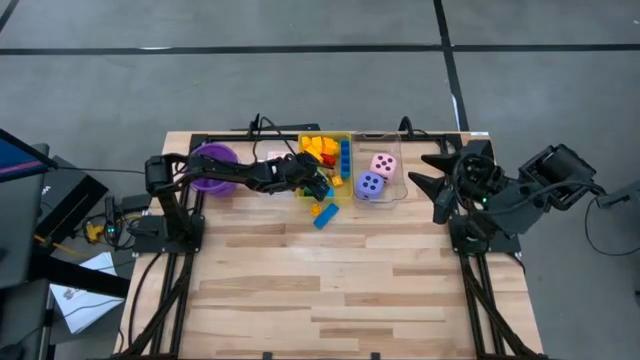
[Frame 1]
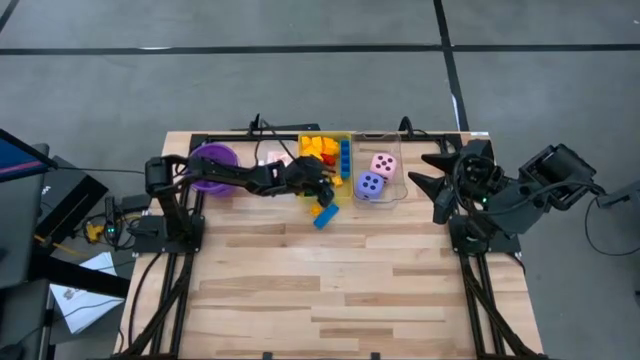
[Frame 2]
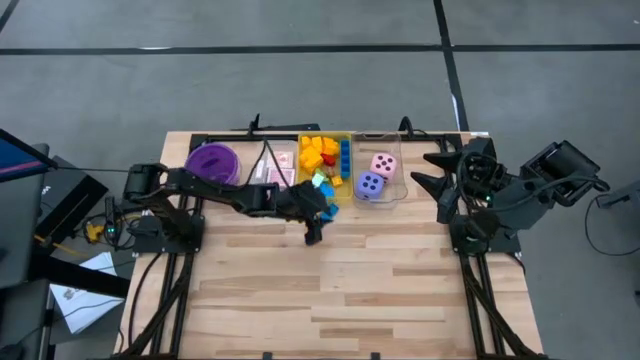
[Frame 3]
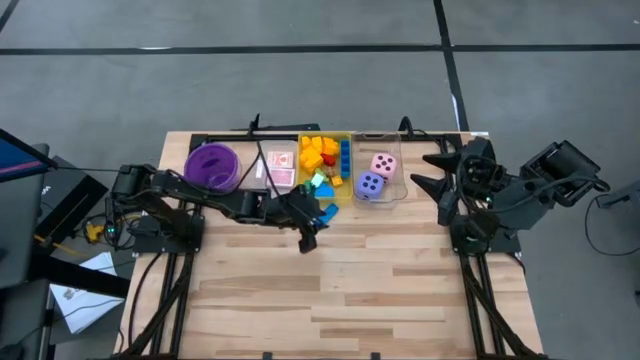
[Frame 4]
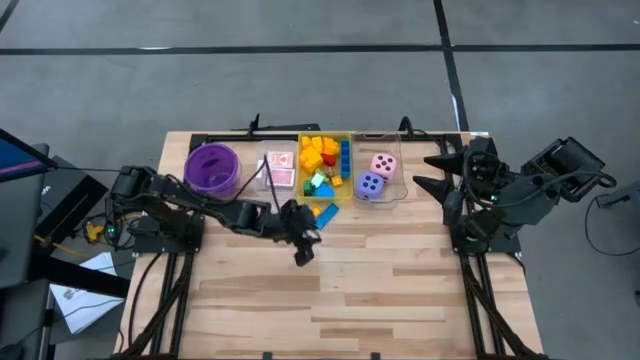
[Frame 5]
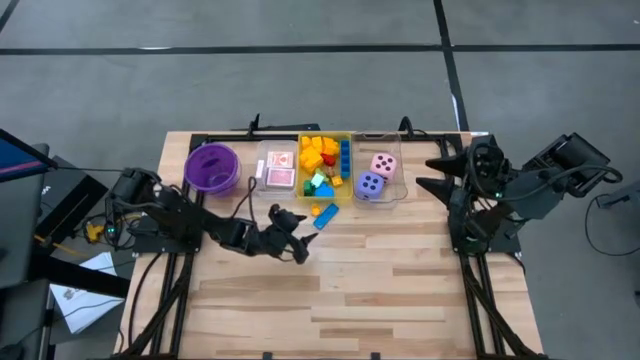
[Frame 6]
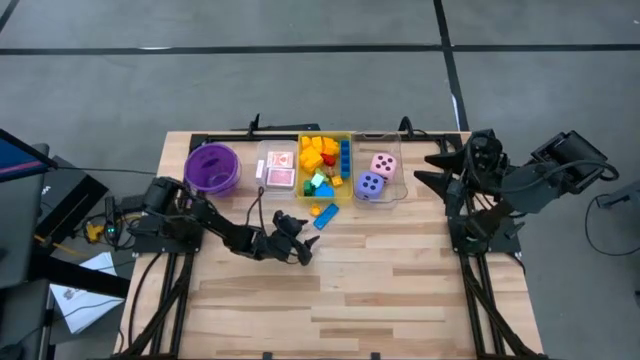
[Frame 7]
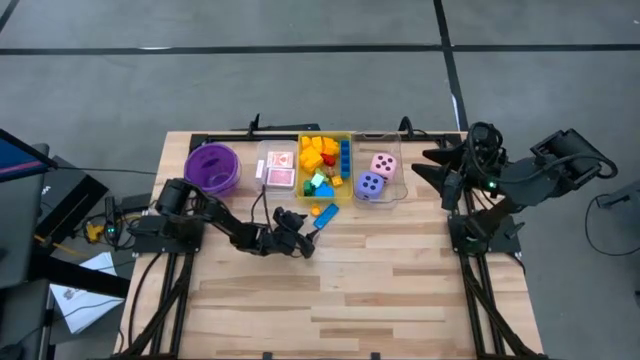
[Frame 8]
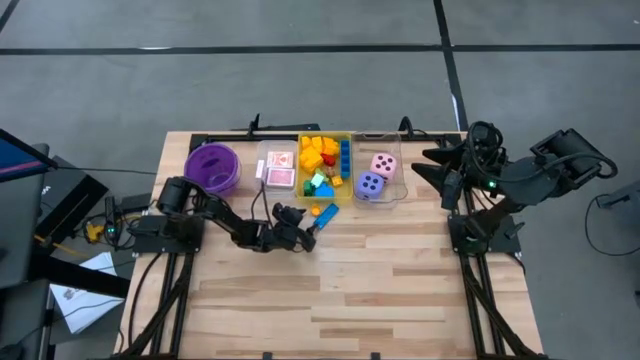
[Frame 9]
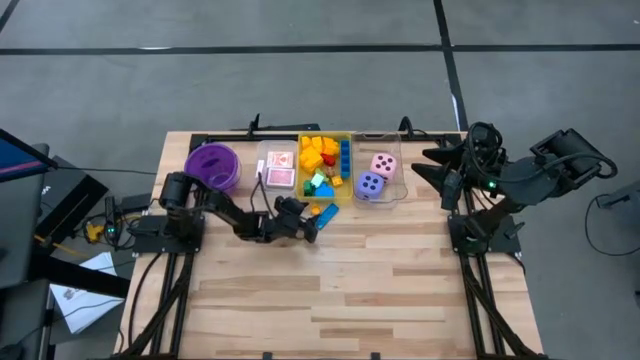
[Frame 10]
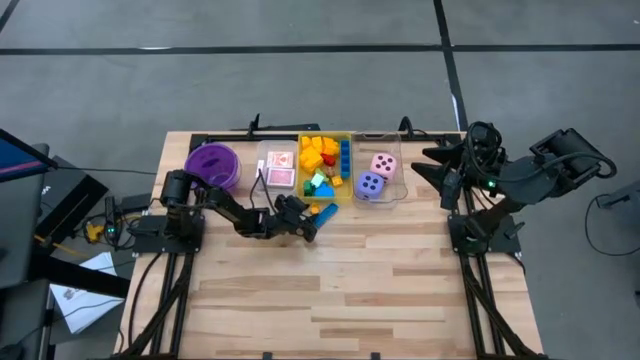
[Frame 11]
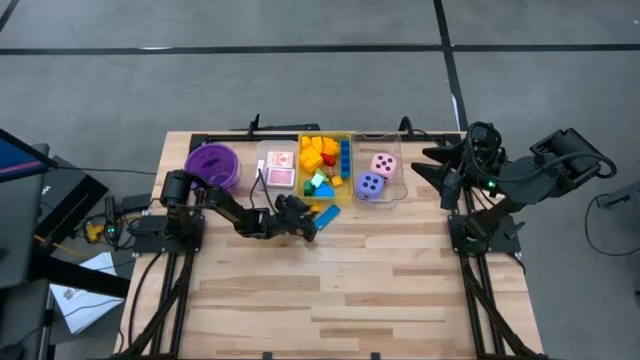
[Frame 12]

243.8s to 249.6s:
Task: Pick & Place Toys
Put the yellow gamepiece into the yellow bin

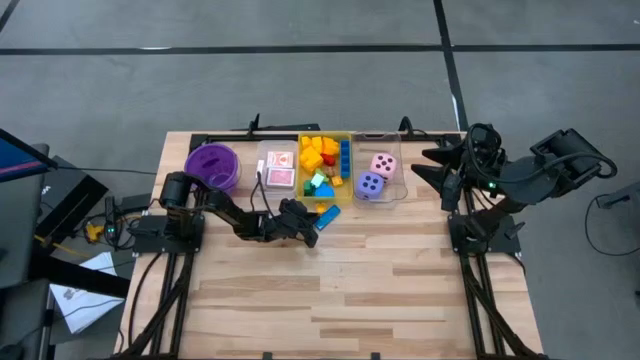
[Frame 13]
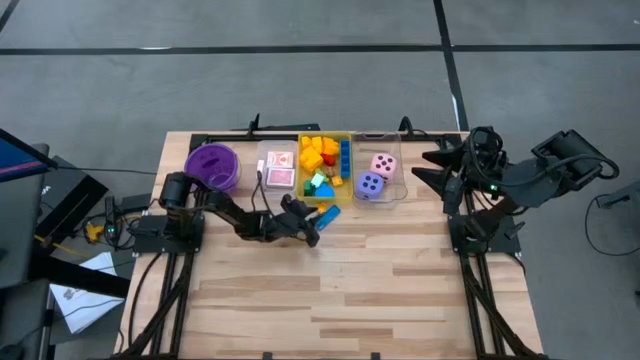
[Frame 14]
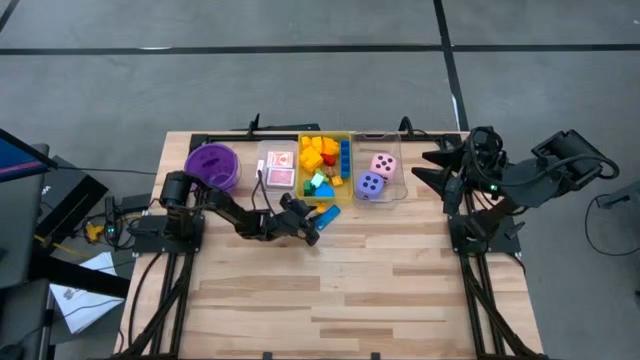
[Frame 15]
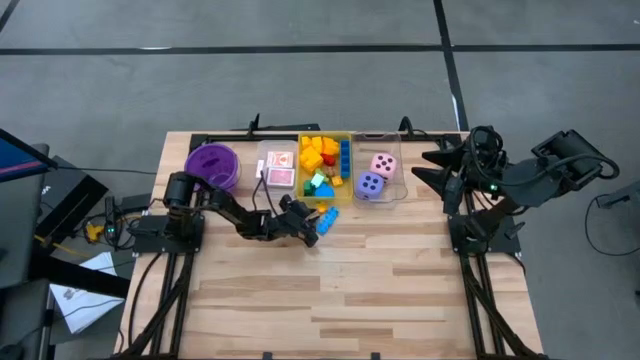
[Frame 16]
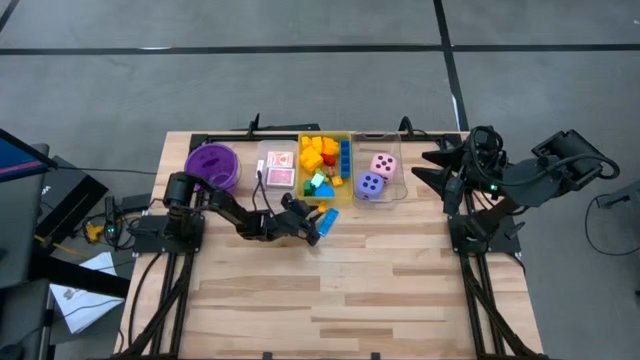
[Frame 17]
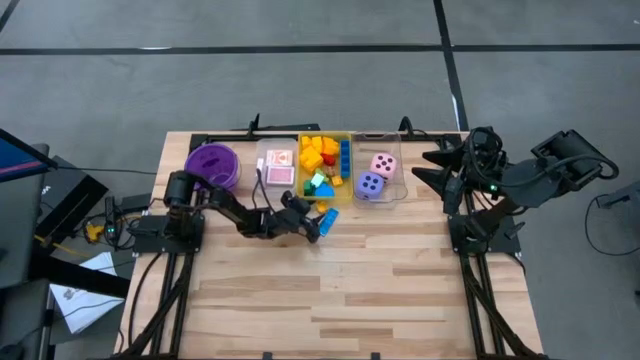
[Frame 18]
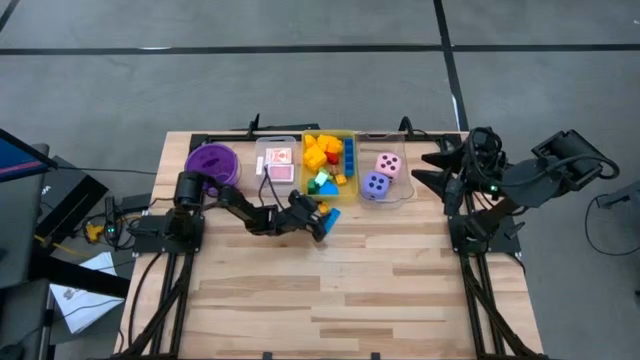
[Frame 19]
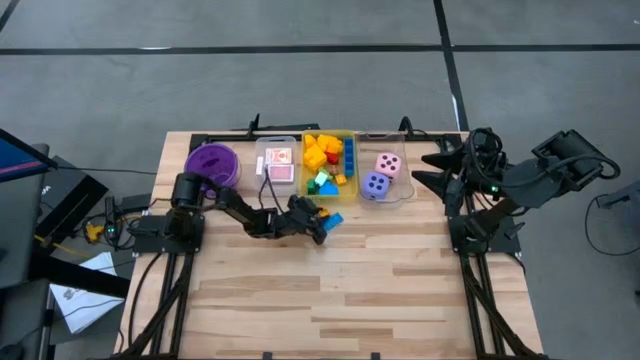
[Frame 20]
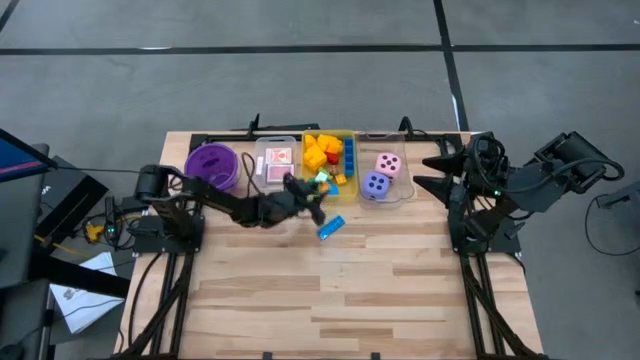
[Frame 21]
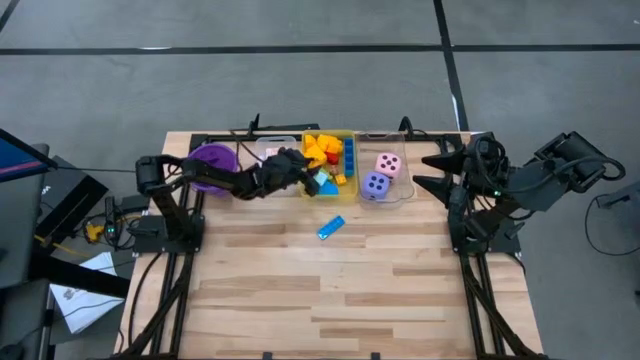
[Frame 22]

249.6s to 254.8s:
Put the yellow gamepiece into the yellow bin

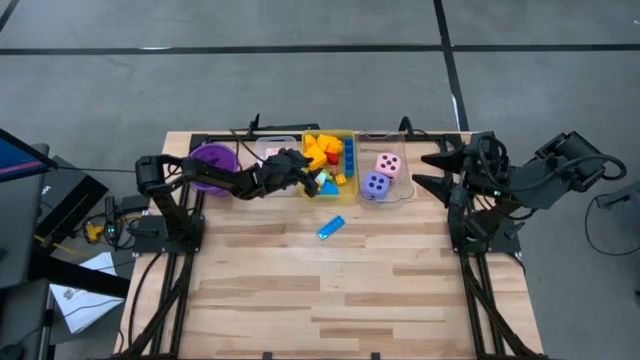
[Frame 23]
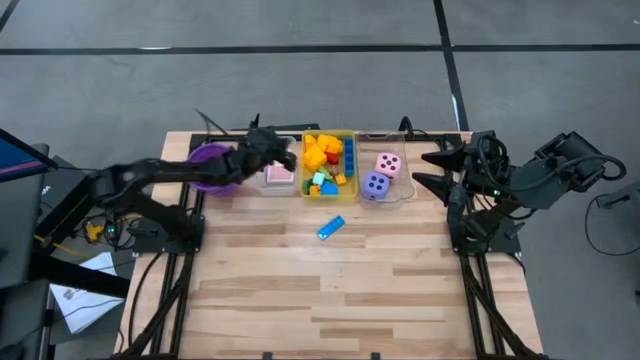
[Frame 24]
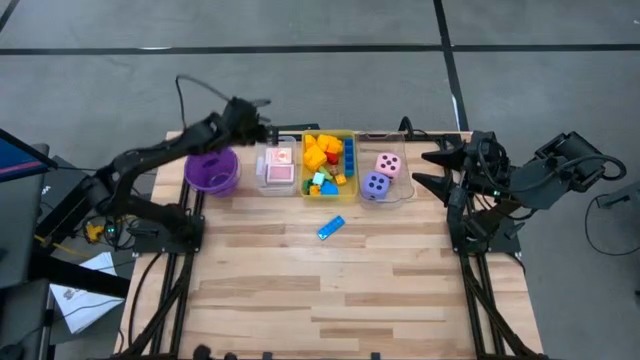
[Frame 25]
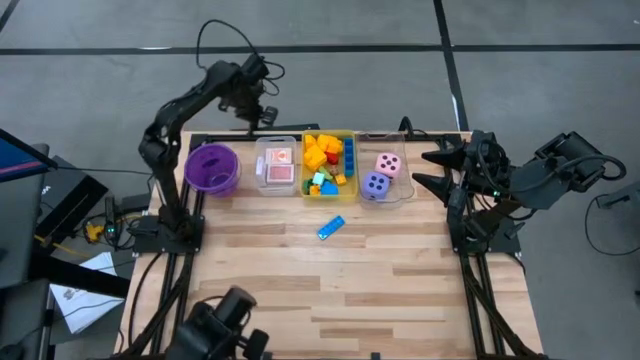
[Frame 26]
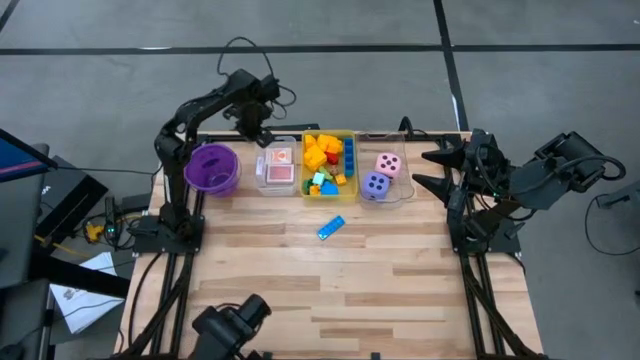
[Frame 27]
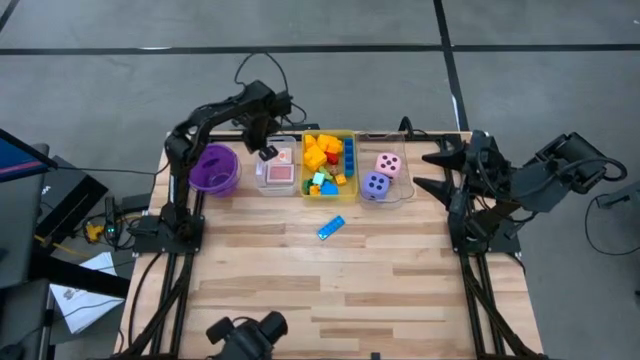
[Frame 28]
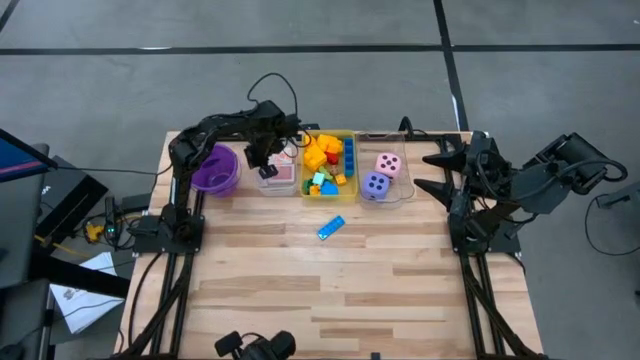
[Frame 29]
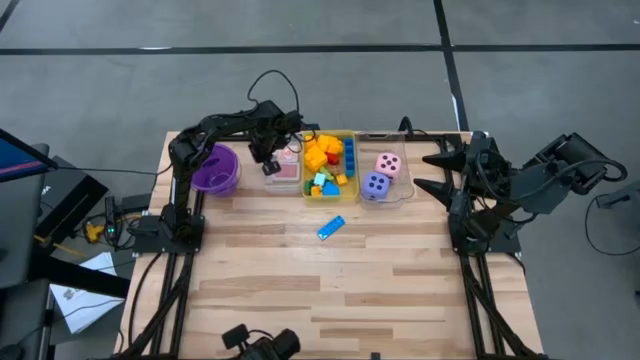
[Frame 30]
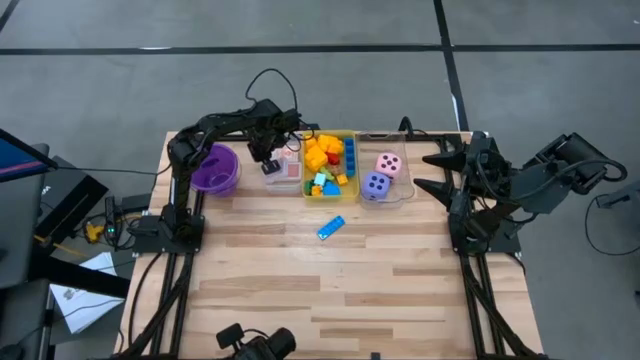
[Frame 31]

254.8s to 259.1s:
Adjust the white bin

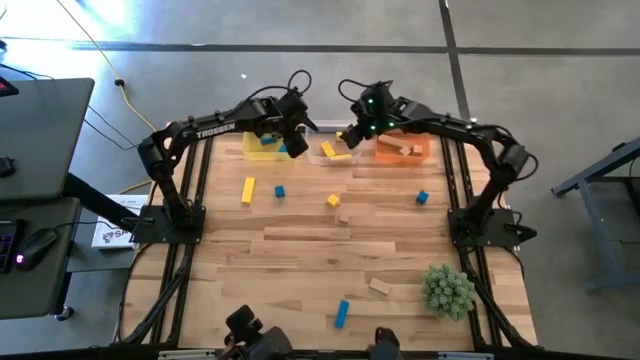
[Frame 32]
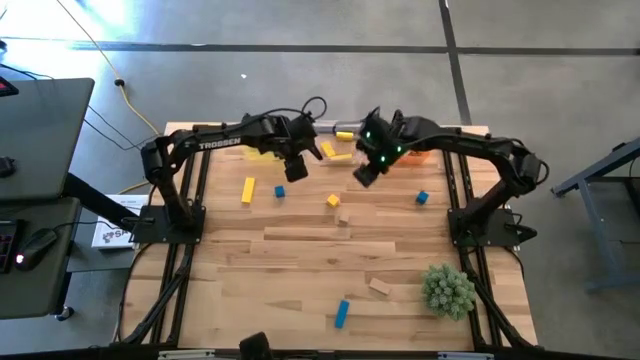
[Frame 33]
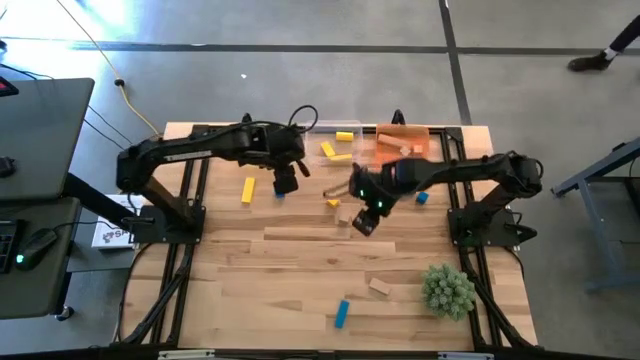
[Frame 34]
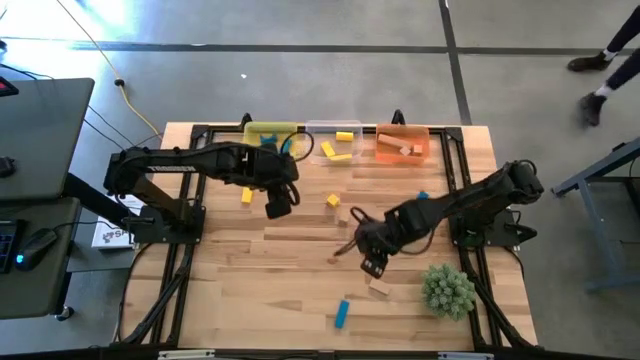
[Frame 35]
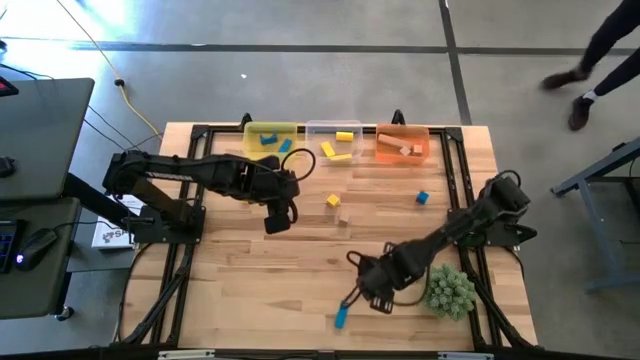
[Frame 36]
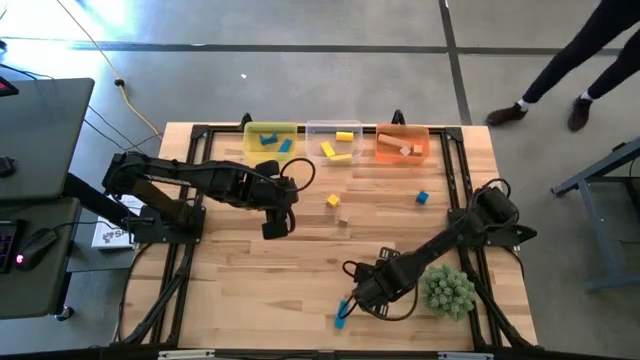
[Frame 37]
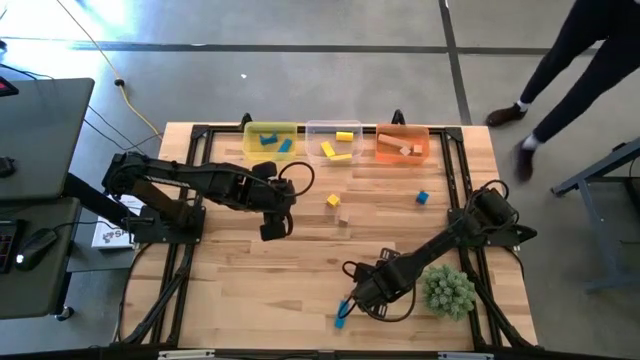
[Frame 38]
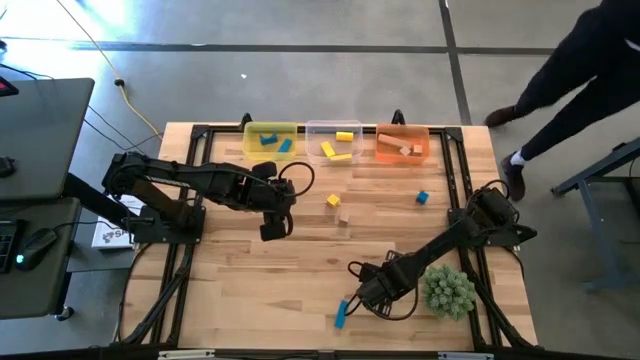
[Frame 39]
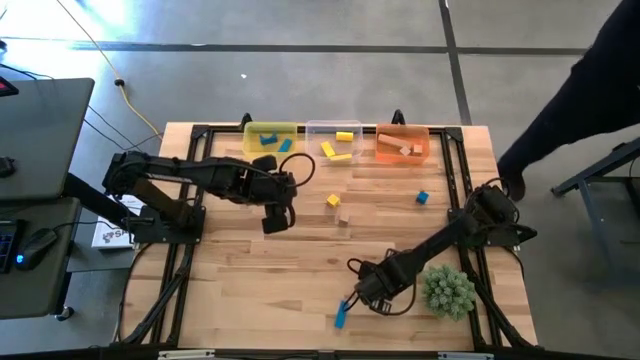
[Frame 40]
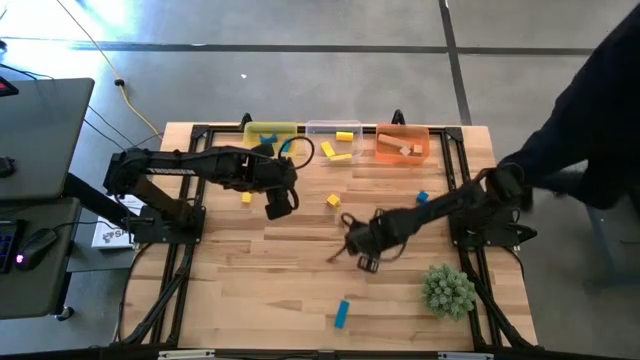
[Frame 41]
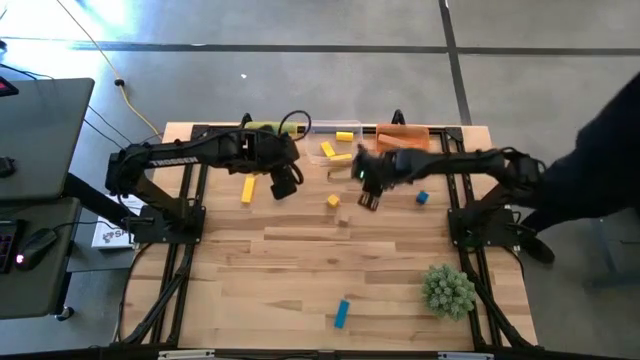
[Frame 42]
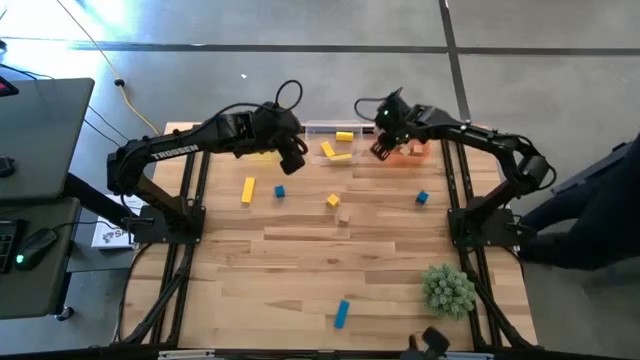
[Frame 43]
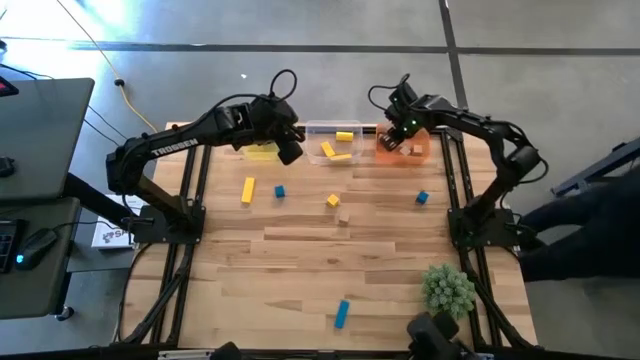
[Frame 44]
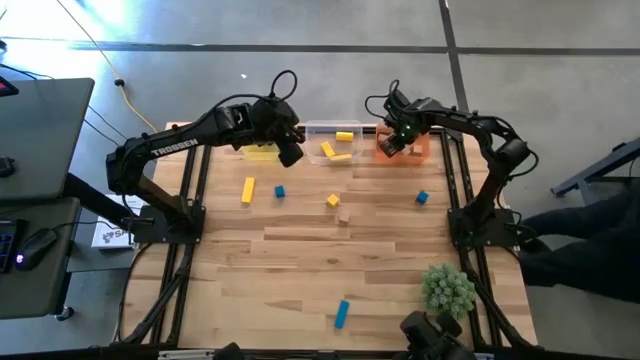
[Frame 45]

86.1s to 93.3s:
Task: Sort & place blocks by color
Put the brown block into the orange bin
